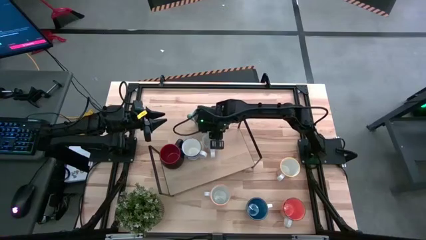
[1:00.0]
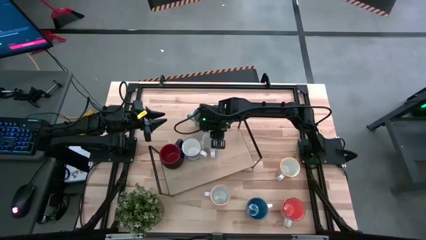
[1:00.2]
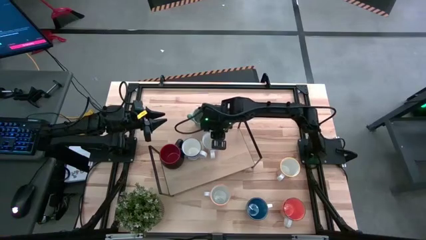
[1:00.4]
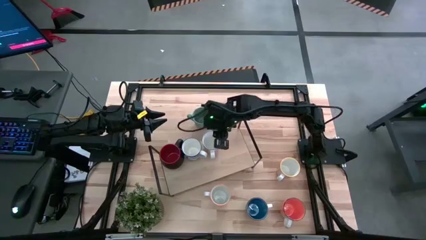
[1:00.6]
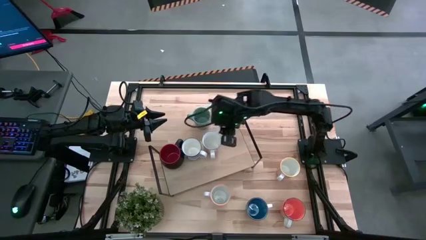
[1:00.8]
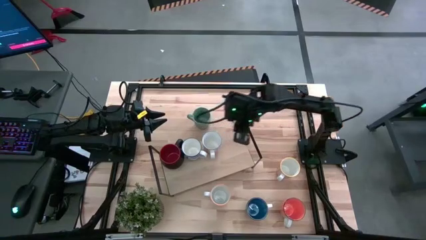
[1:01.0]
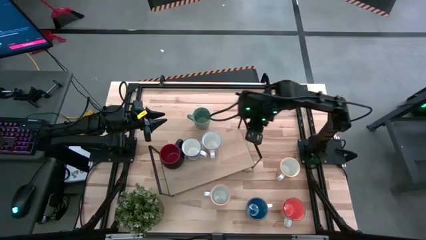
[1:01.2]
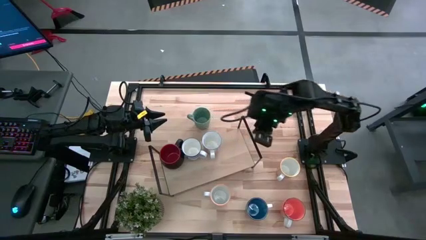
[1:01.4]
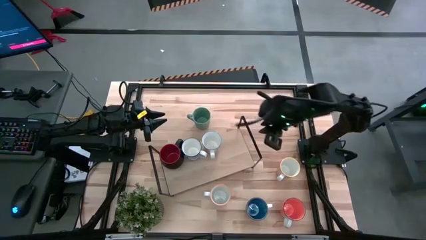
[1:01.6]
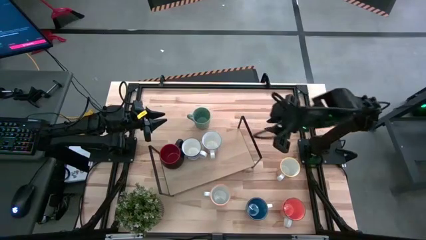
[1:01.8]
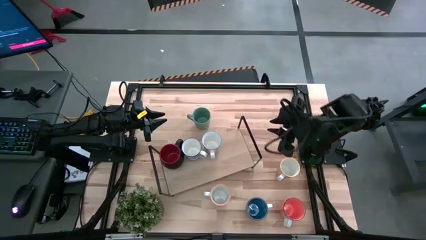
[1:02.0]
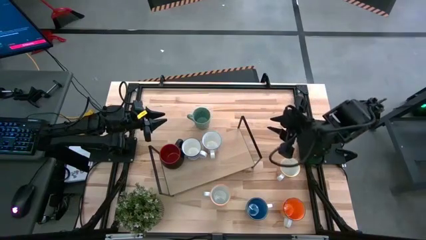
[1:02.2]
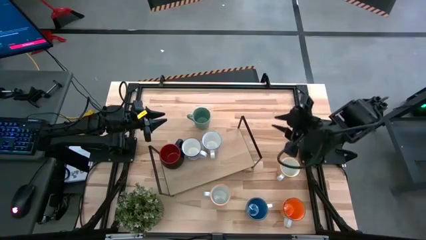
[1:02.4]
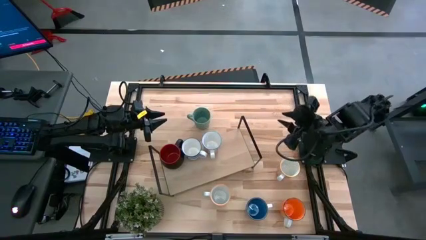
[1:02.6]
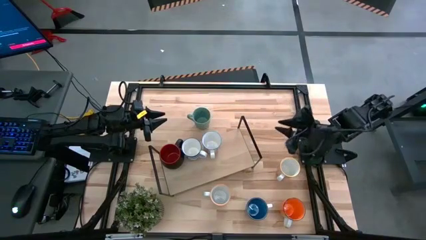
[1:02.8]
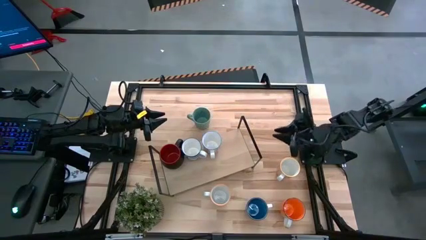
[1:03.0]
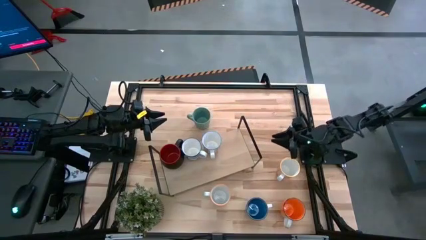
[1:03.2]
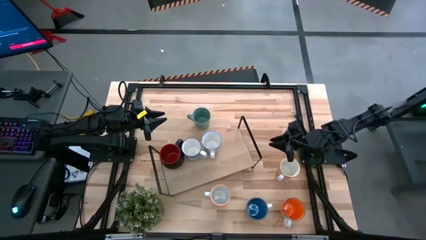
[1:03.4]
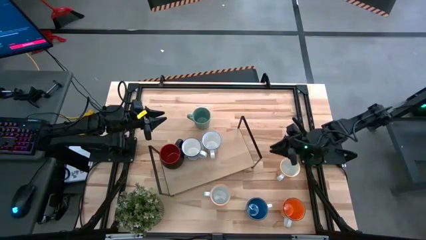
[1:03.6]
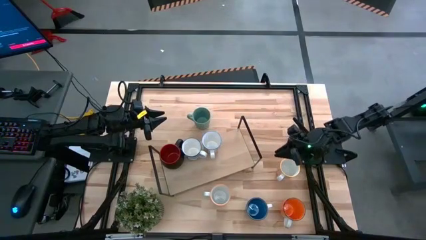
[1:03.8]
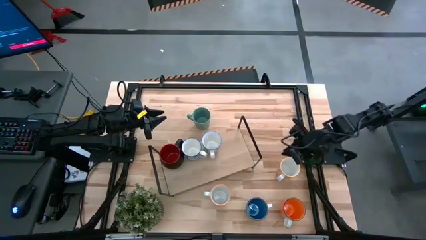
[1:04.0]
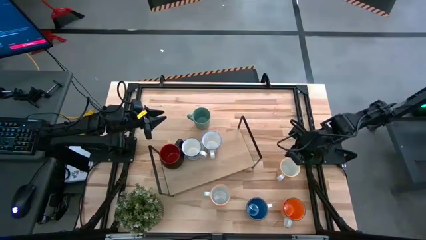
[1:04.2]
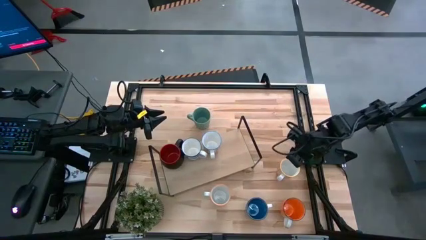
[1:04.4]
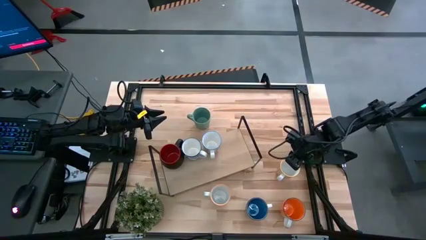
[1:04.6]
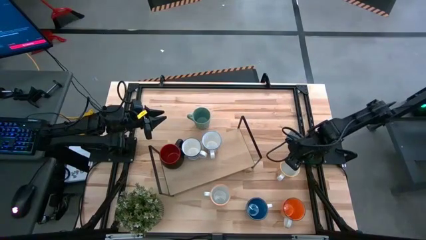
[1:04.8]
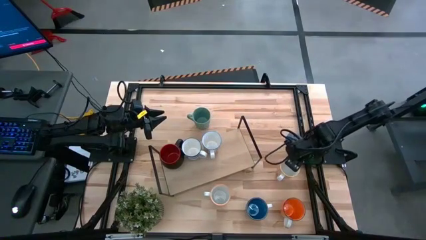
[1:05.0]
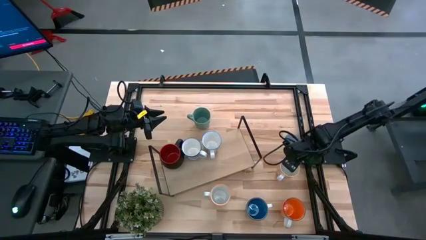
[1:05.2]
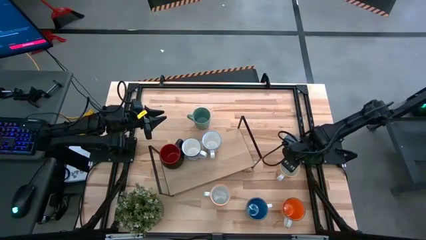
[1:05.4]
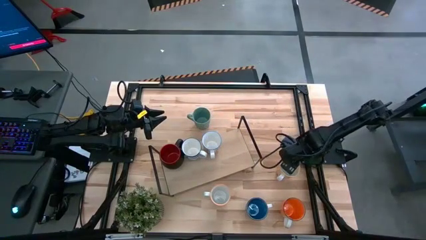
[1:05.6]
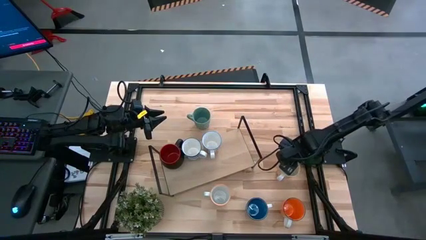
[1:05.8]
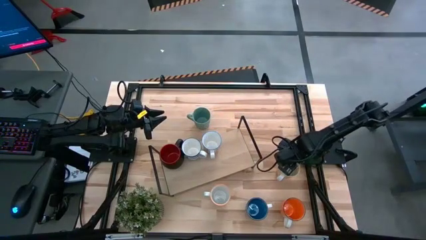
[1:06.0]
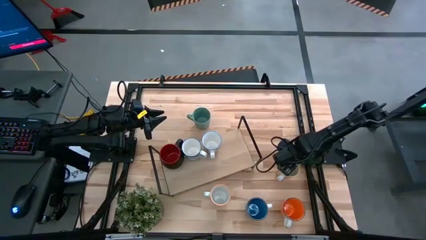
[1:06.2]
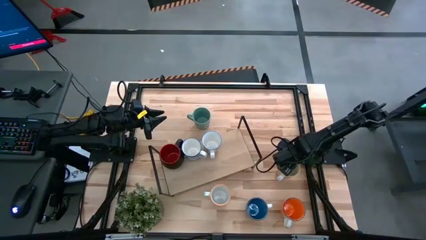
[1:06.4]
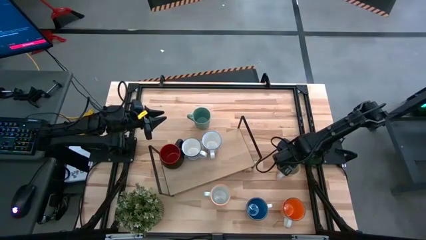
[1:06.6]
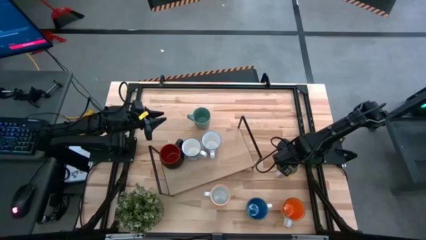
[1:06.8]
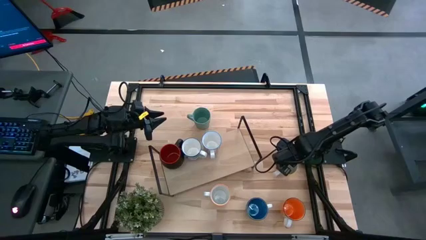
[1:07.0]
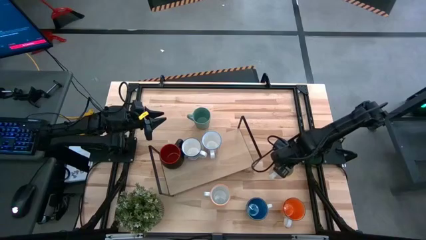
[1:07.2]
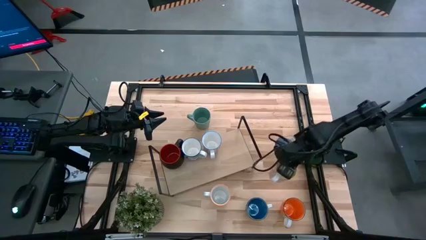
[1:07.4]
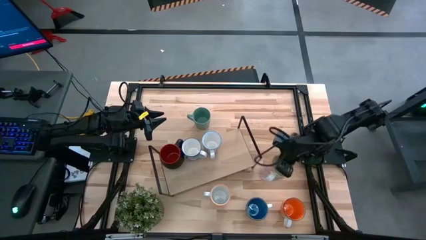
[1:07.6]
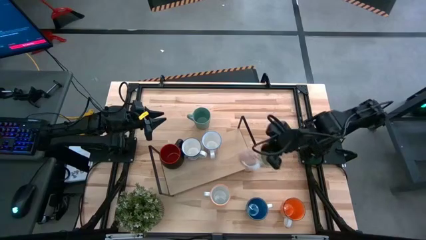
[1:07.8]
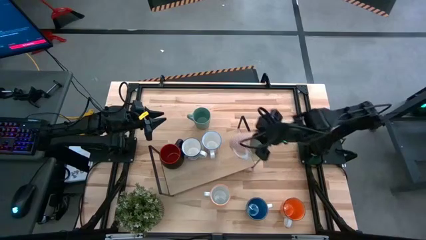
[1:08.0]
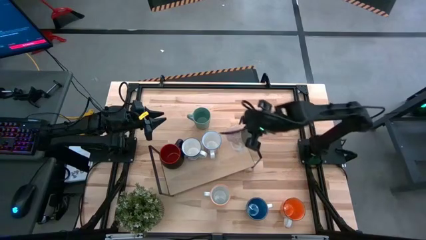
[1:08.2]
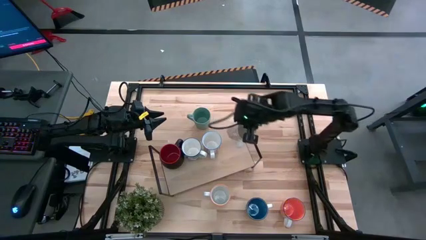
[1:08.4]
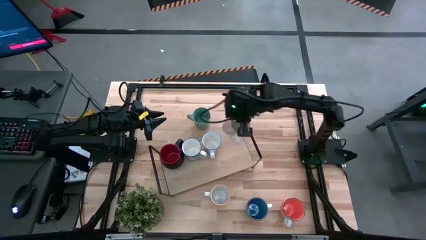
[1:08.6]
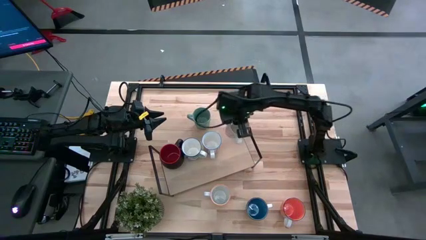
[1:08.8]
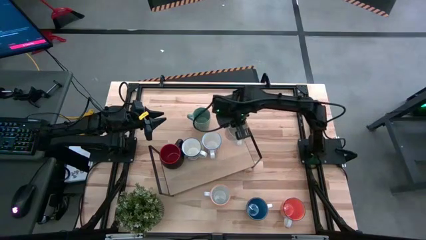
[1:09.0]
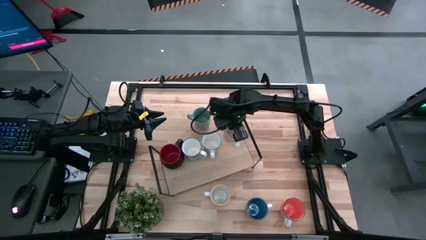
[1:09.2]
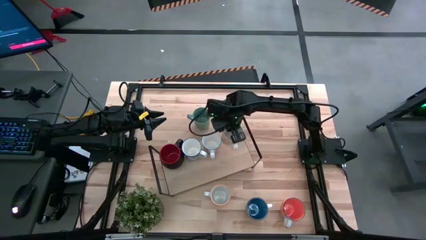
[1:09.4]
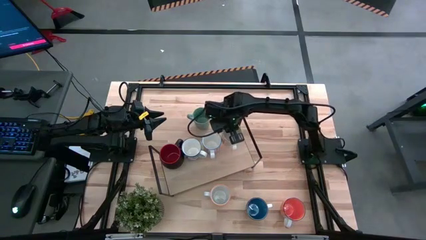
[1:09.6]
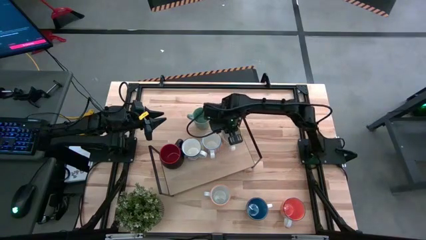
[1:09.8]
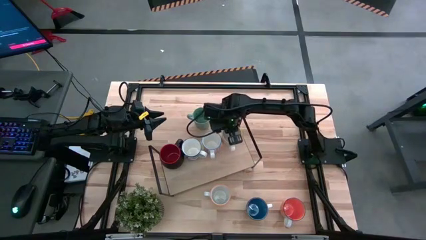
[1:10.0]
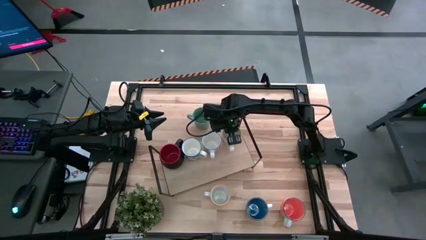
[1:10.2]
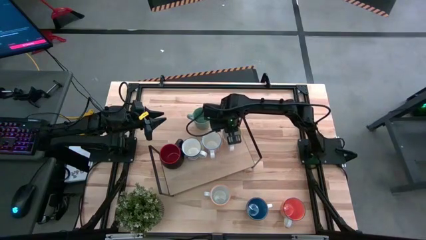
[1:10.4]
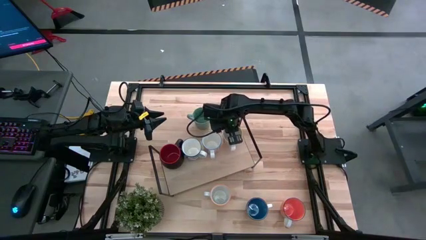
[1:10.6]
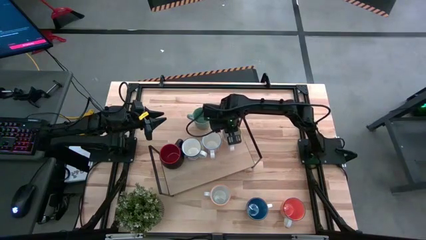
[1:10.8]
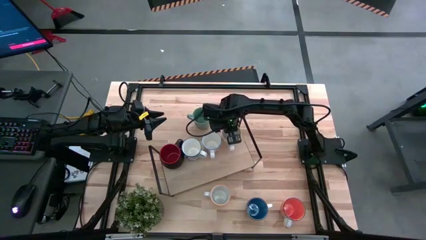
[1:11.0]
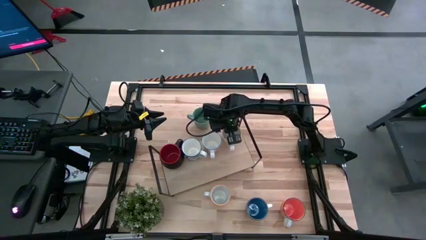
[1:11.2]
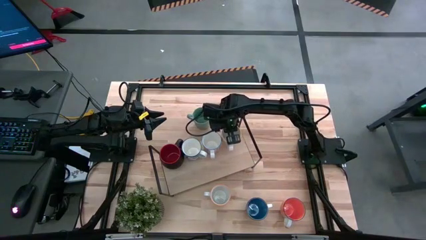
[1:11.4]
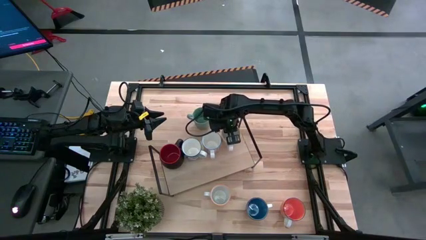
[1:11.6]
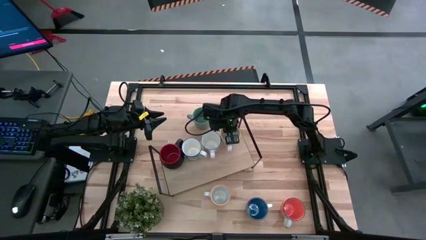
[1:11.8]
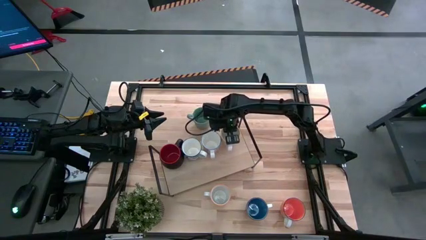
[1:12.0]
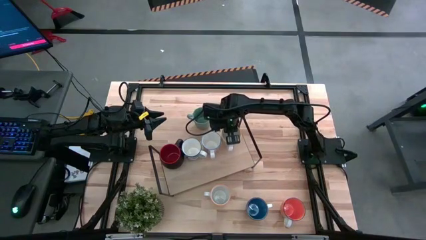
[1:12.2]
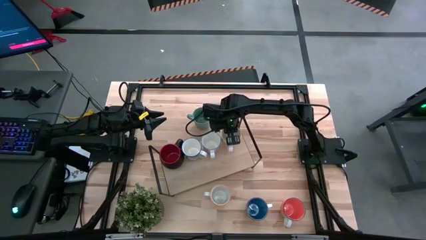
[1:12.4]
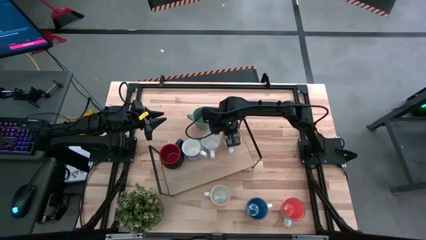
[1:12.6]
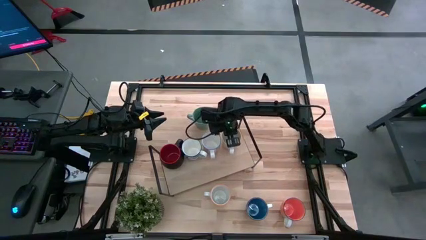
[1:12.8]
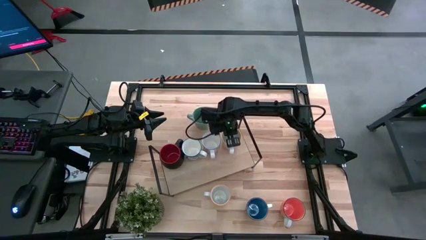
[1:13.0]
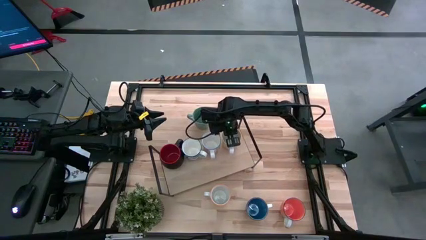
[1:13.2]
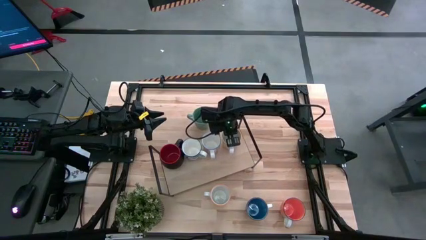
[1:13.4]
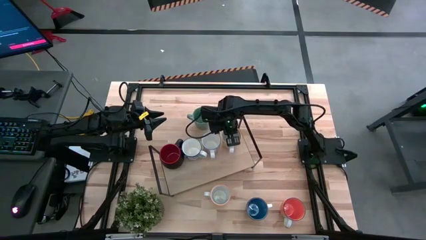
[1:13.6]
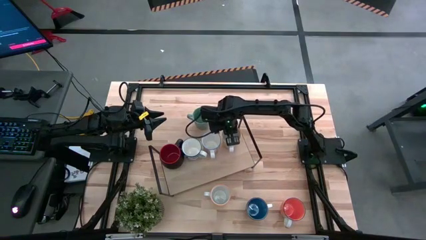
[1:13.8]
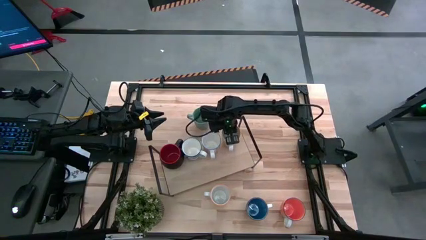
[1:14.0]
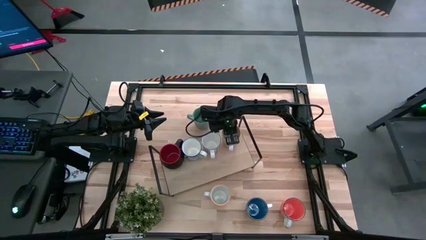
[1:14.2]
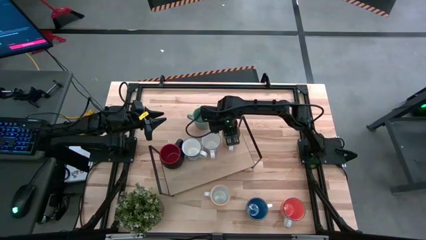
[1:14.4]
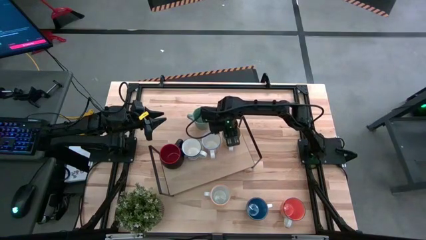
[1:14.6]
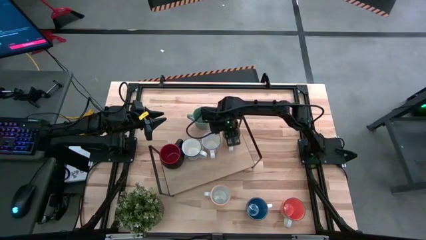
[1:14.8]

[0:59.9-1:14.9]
Task: Place coffee mugs
Put the orange pattern mug on the shelf
